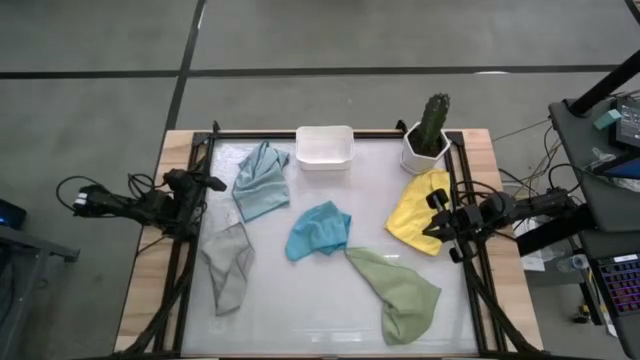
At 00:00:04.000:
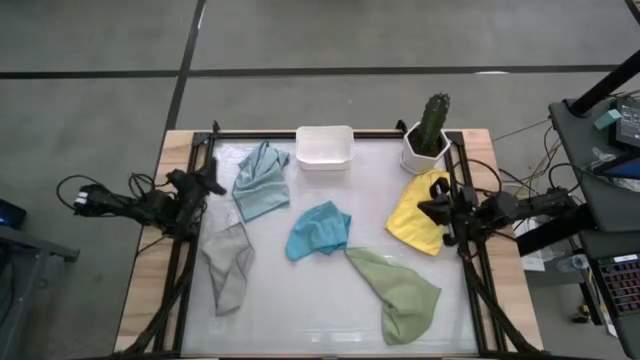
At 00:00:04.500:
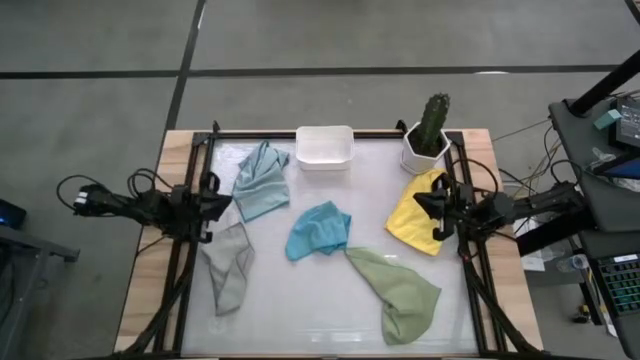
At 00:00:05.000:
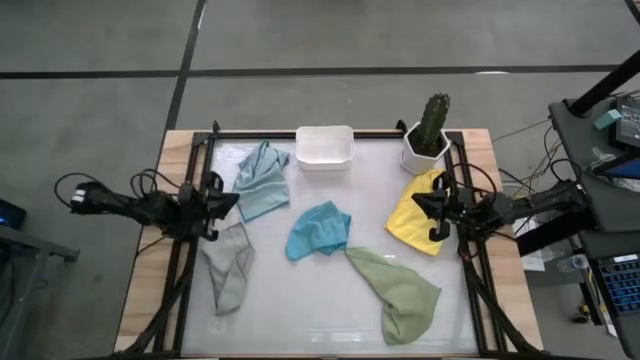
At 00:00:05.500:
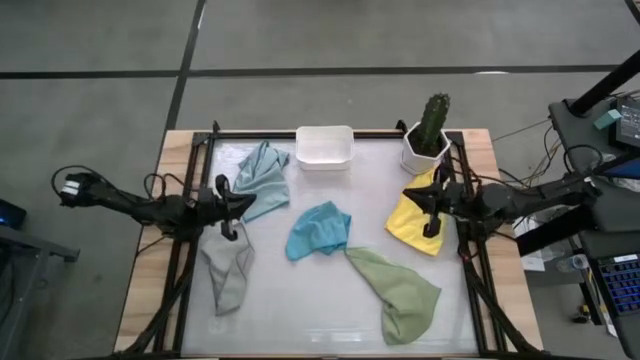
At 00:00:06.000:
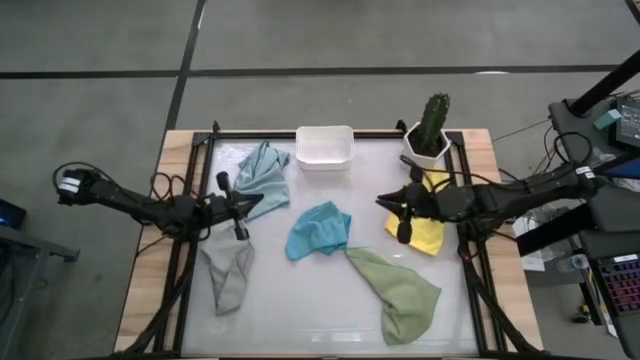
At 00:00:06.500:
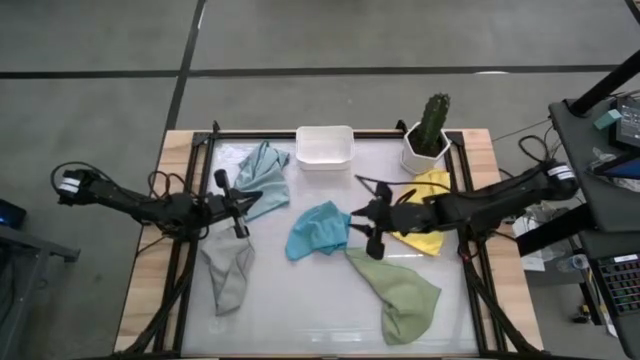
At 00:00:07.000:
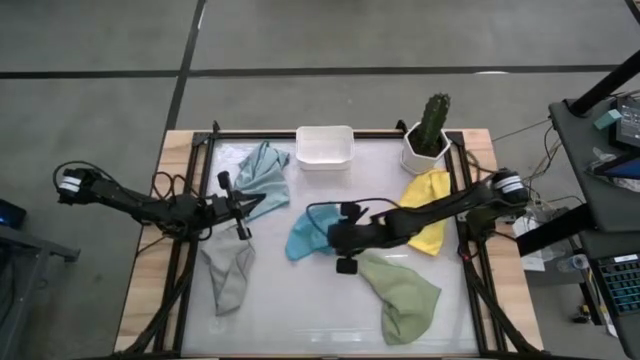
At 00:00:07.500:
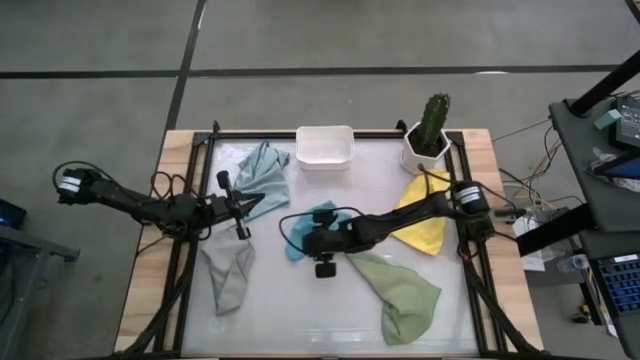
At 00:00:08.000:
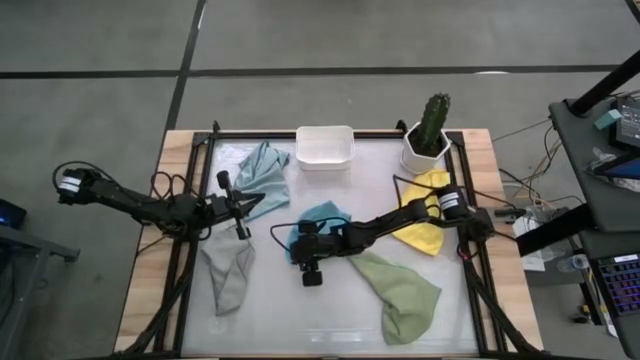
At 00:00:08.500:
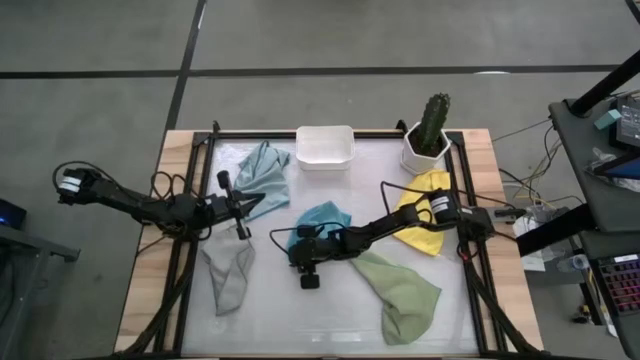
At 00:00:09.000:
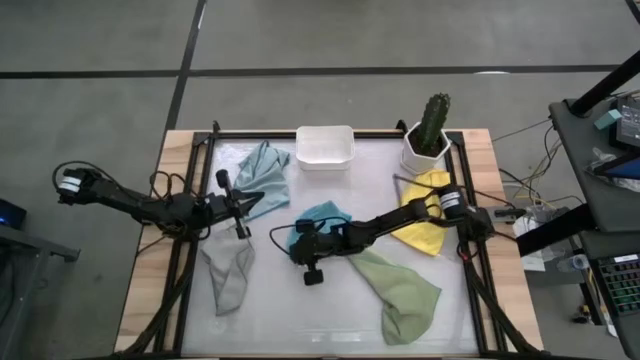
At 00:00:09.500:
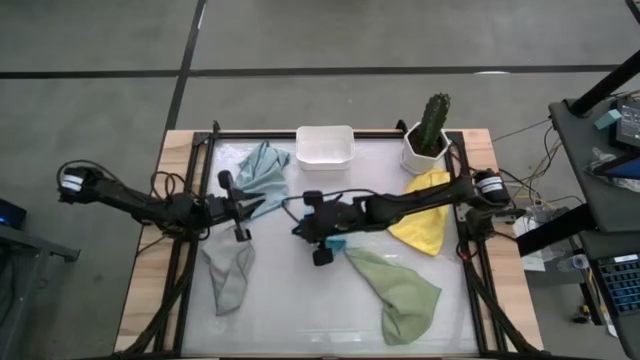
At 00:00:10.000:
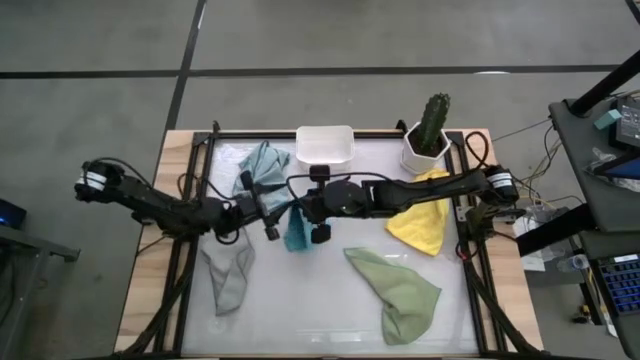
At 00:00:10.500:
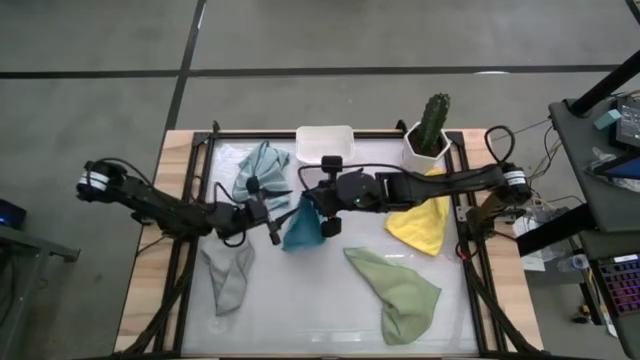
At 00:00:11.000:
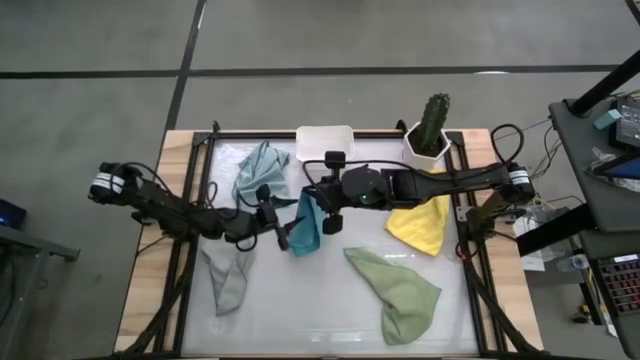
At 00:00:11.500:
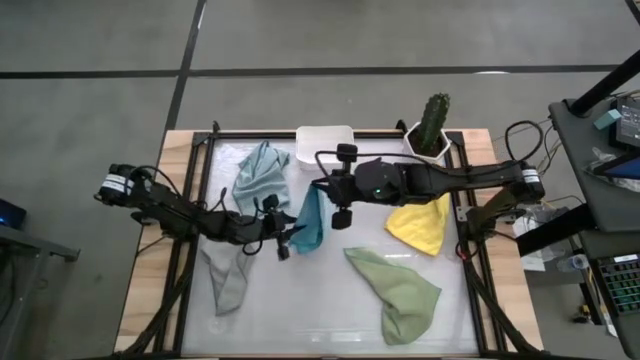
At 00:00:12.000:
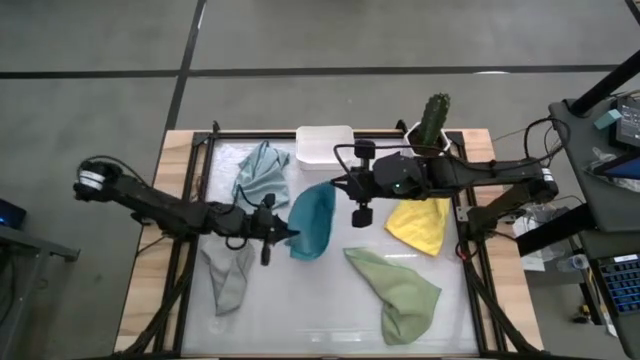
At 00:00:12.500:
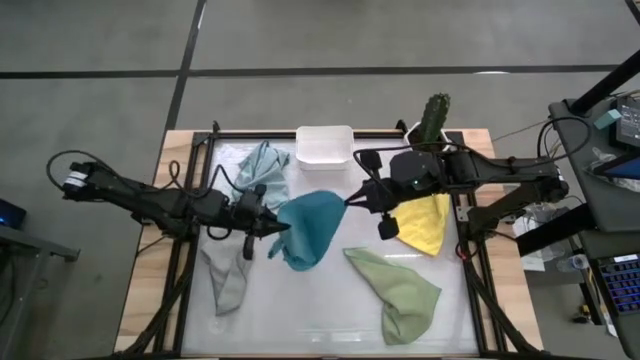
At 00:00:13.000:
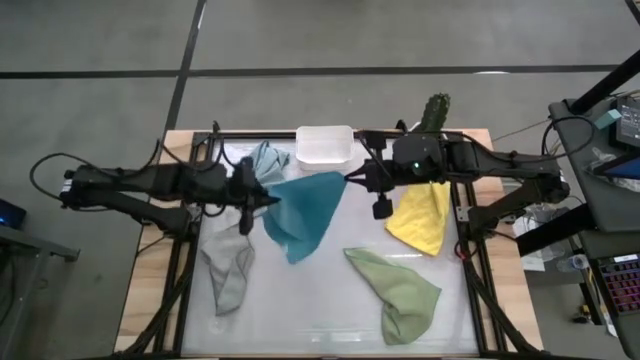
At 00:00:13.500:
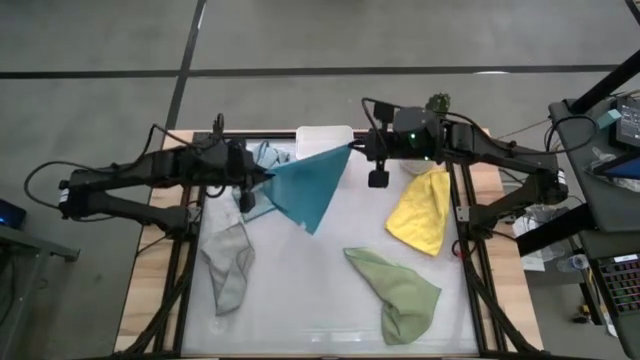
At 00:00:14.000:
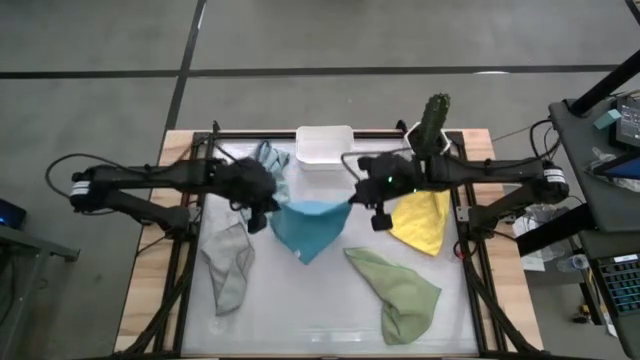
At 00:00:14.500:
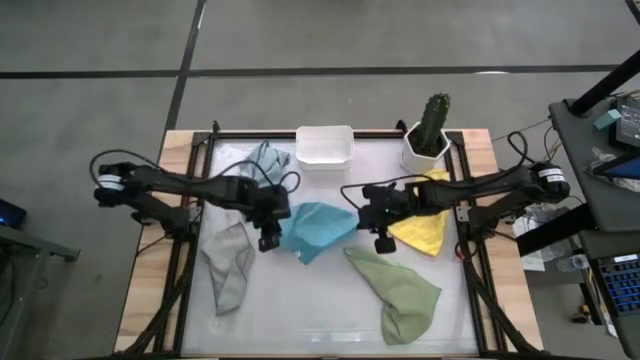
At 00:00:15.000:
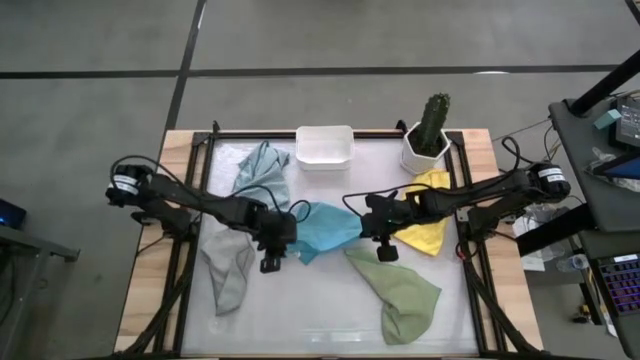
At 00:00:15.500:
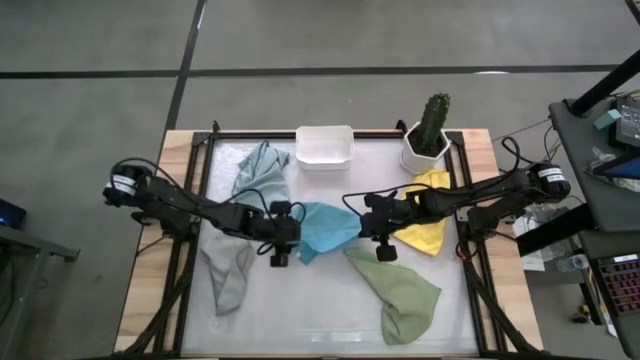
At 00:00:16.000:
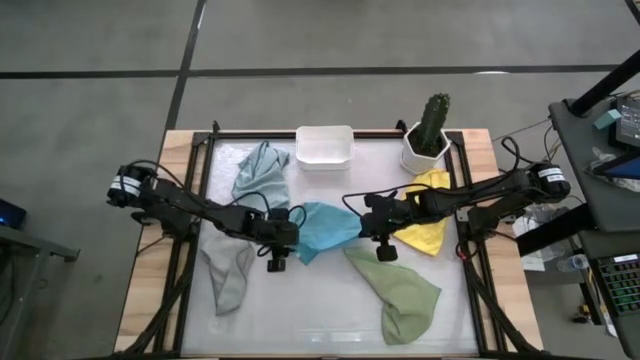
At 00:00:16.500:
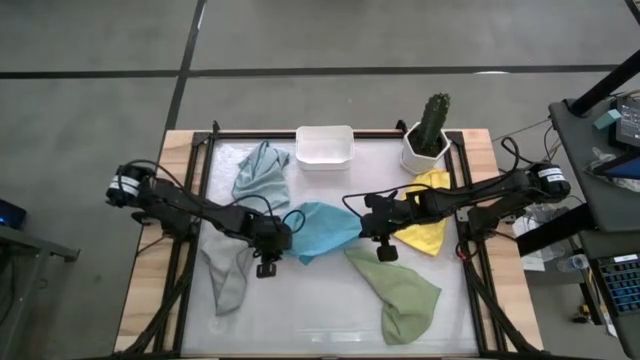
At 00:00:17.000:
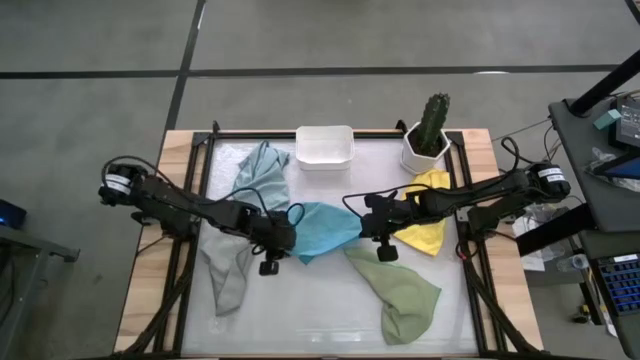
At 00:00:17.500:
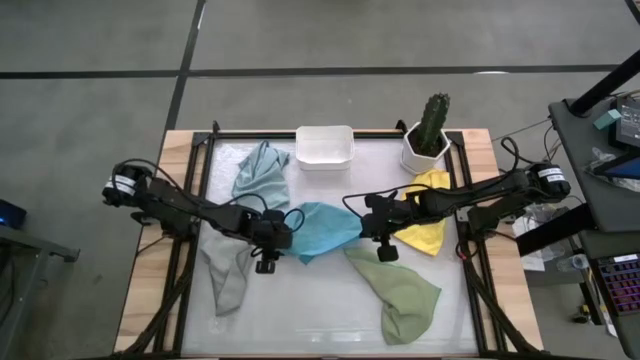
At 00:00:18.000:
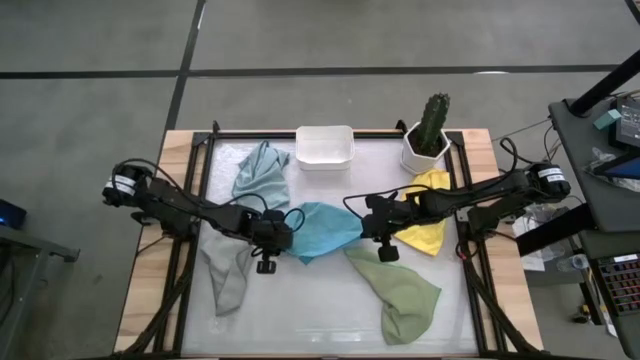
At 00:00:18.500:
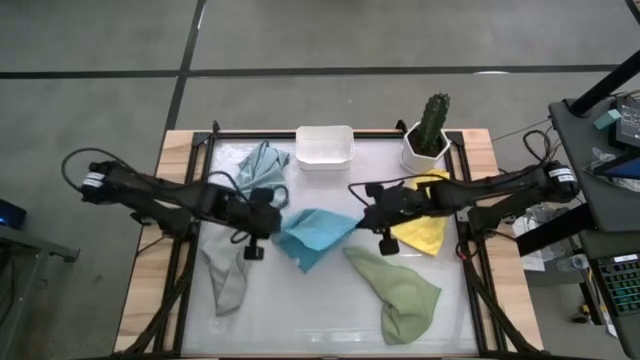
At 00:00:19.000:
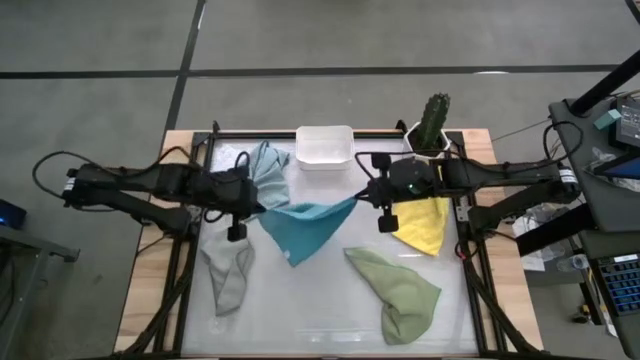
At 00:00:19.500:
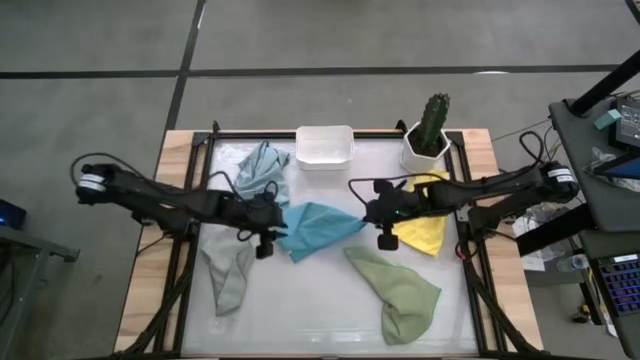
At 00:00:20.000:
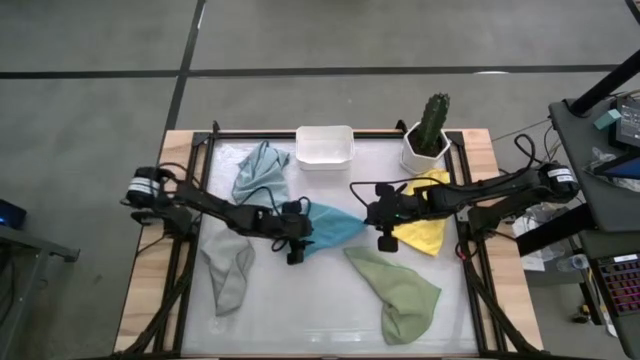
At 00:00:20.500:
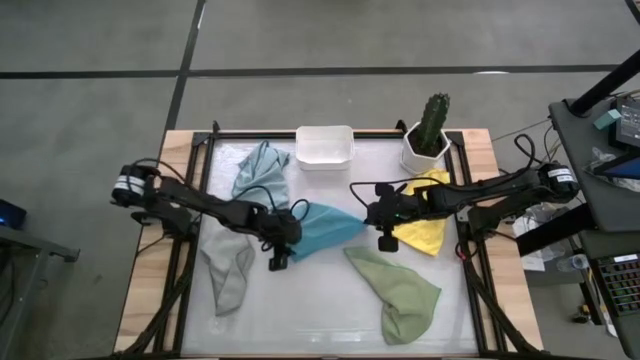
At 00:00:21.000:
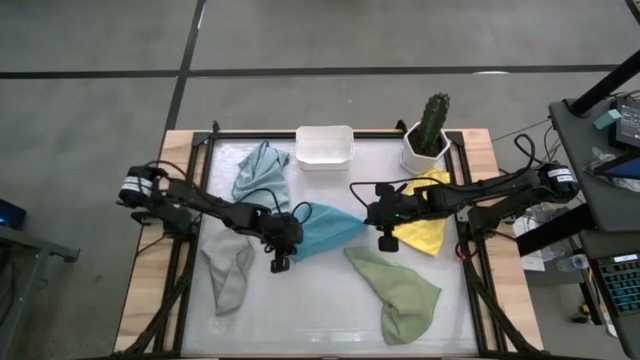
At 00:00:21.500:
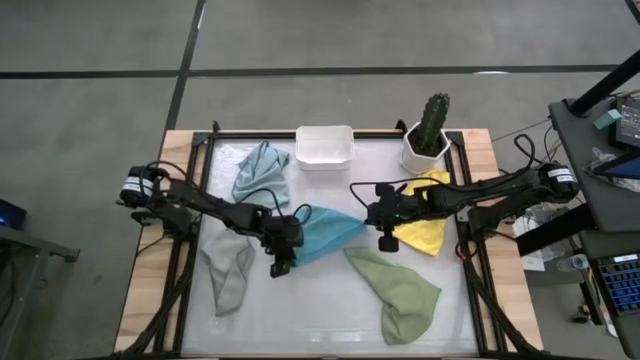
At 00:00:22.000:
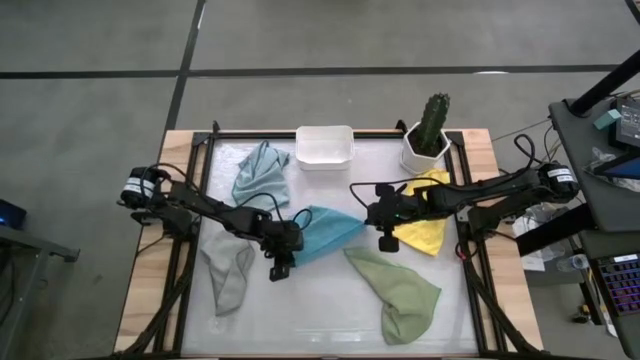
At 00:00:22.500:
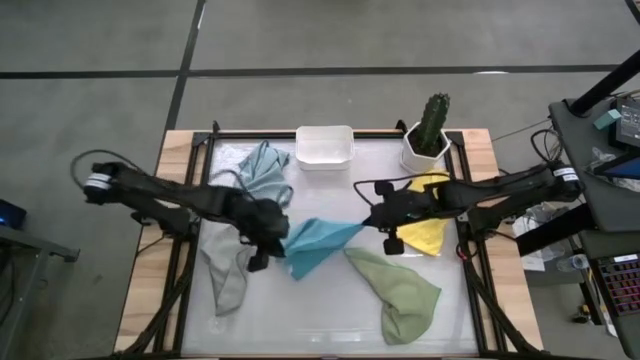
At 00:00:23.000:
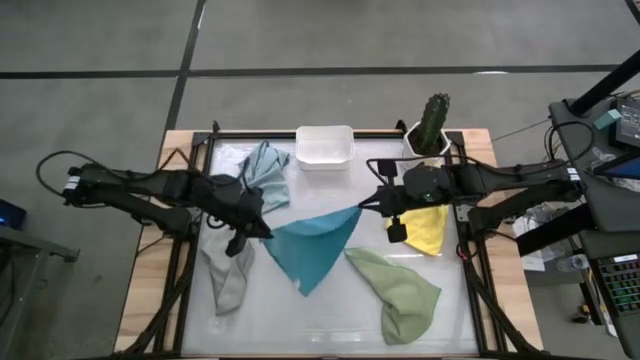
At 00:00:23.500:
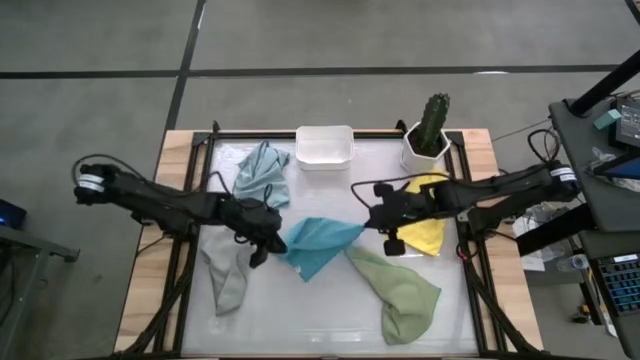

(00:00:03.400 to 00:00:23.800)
Task: Fold microfiber towels
Fold the blue cloth
